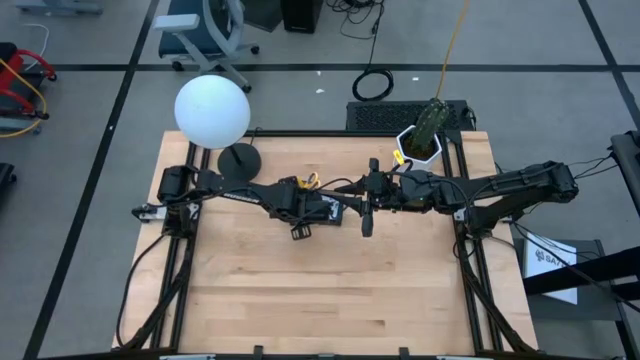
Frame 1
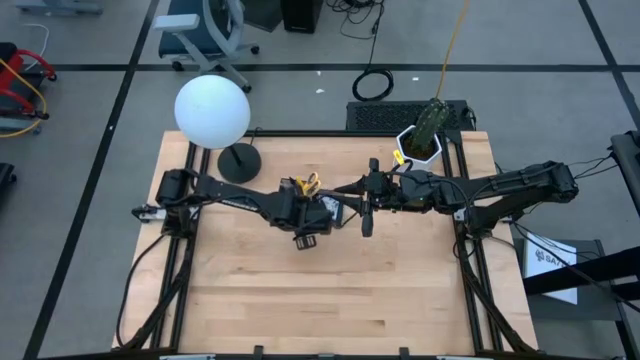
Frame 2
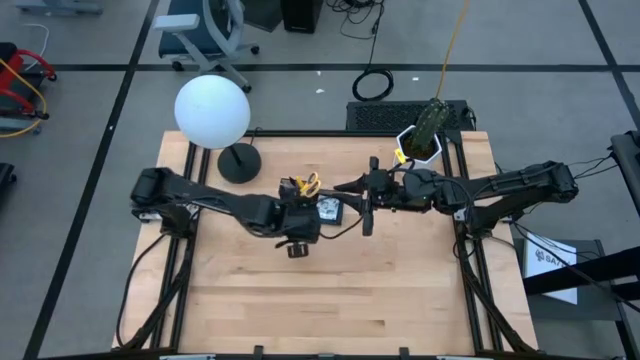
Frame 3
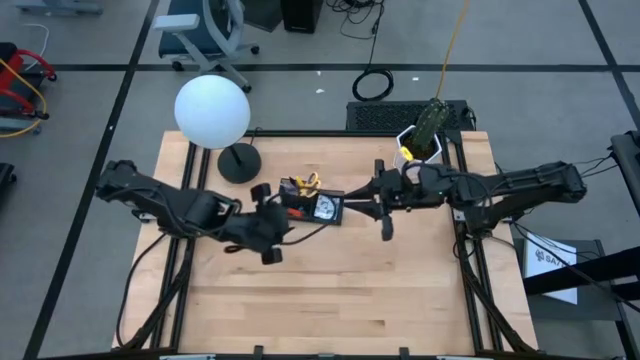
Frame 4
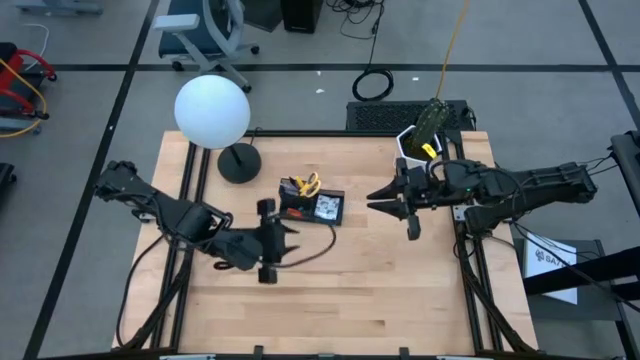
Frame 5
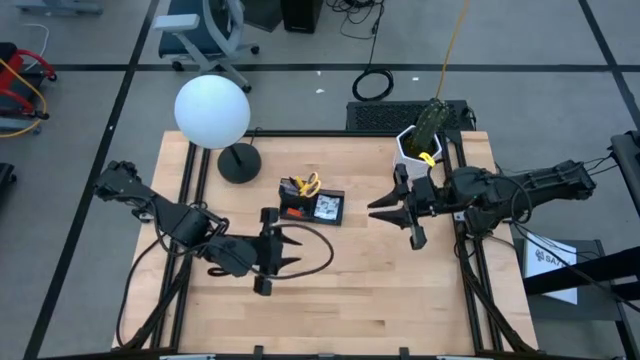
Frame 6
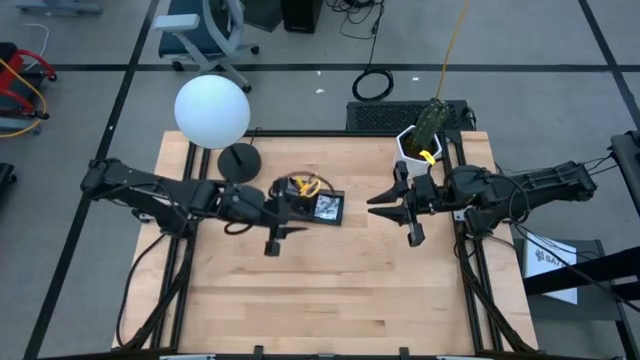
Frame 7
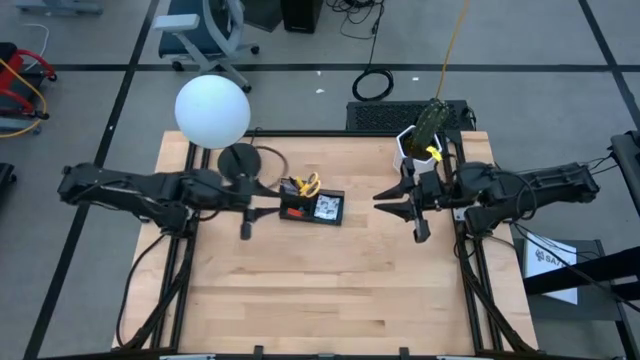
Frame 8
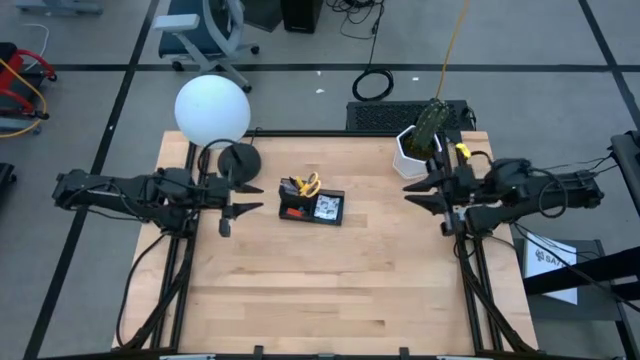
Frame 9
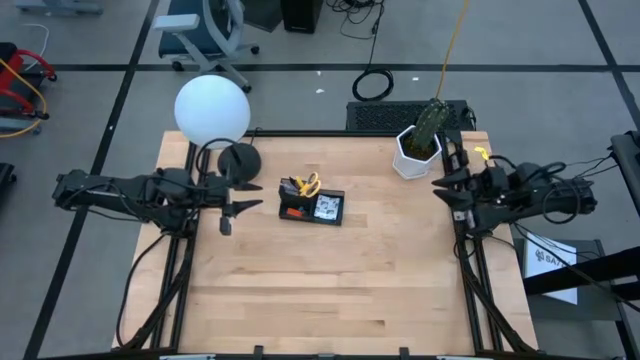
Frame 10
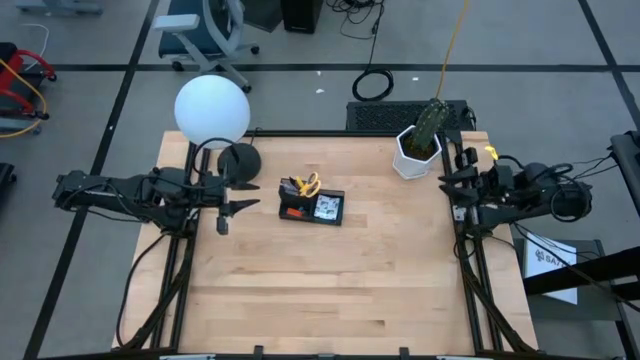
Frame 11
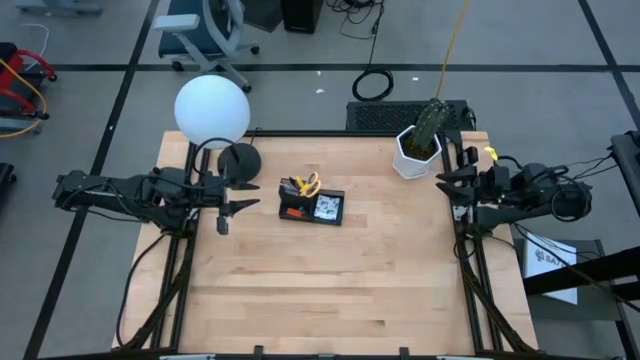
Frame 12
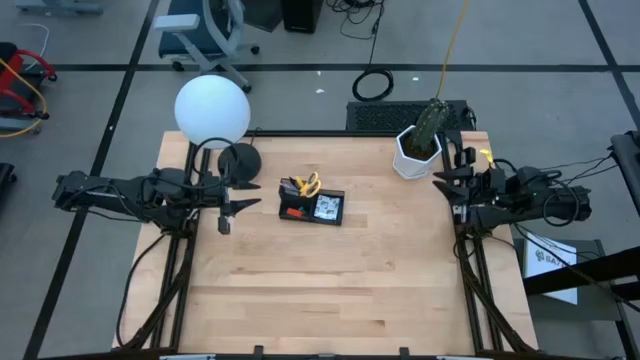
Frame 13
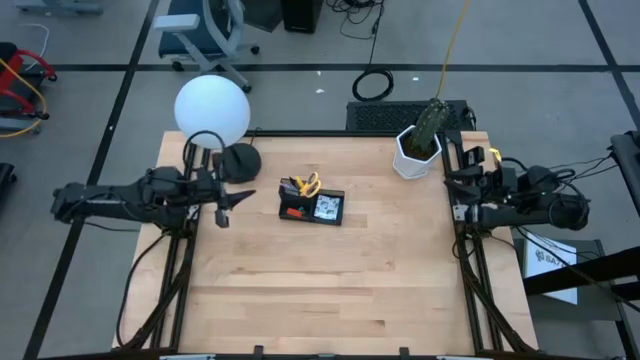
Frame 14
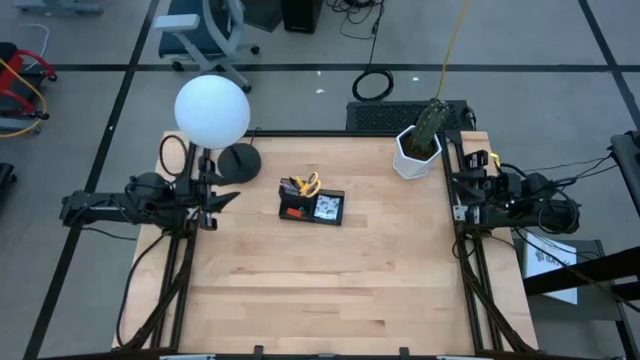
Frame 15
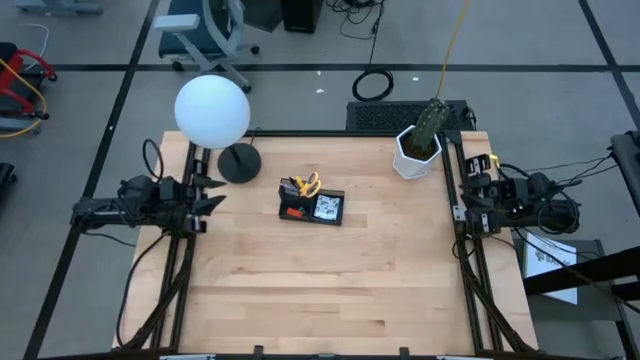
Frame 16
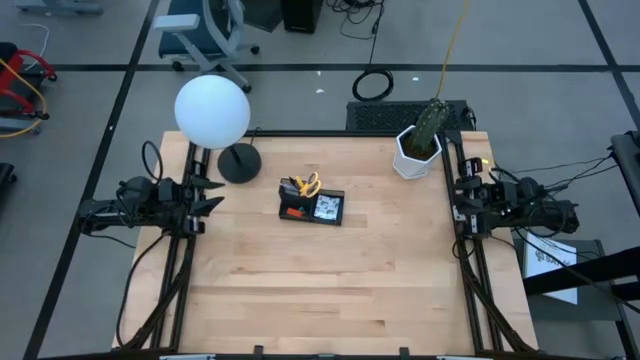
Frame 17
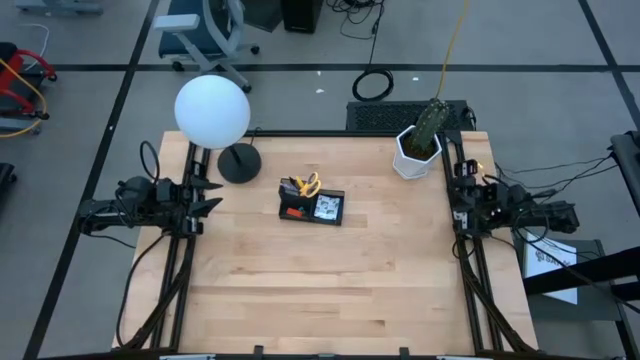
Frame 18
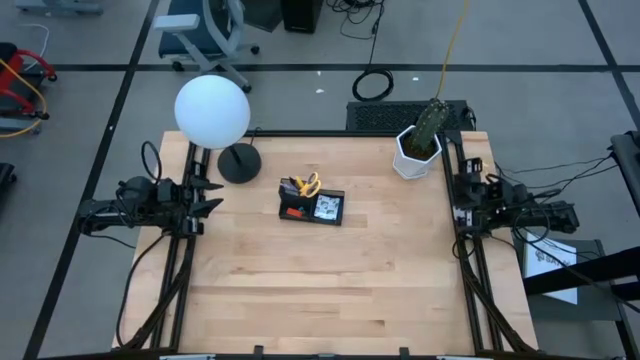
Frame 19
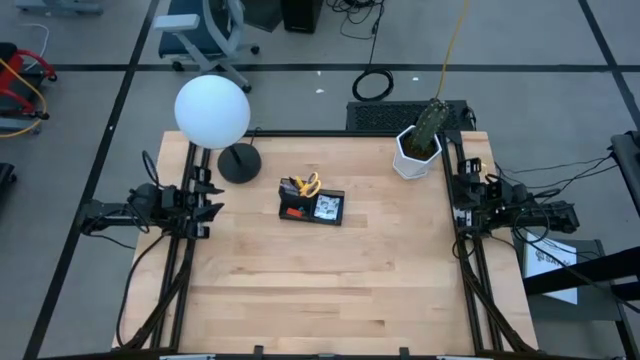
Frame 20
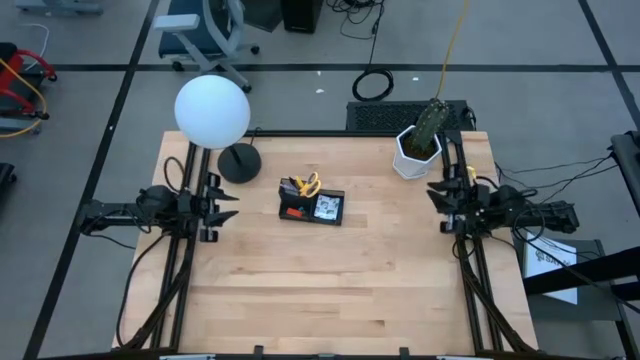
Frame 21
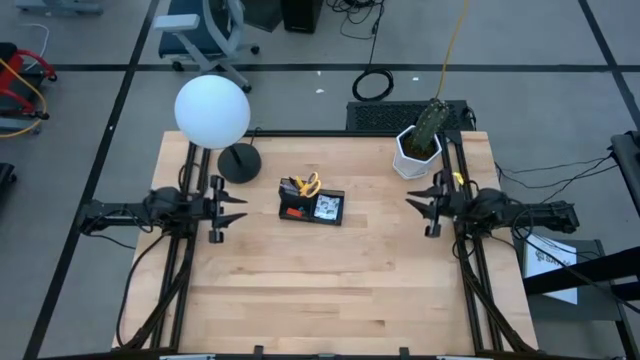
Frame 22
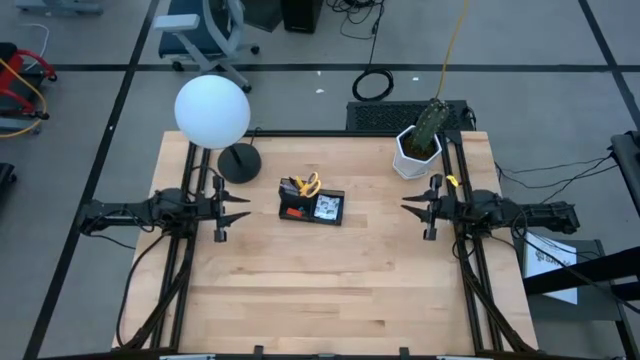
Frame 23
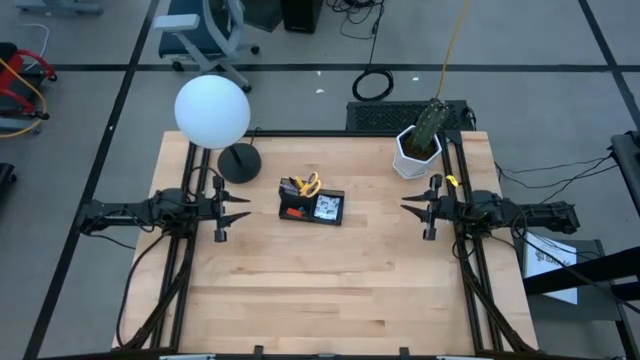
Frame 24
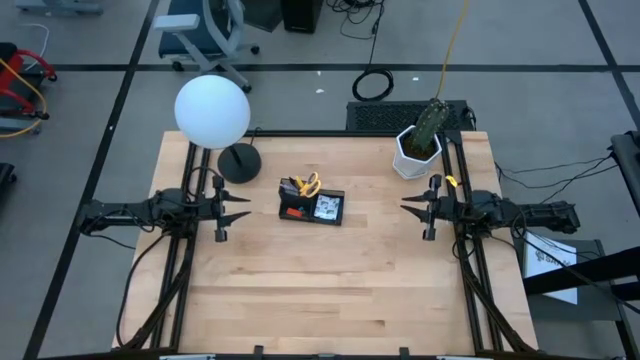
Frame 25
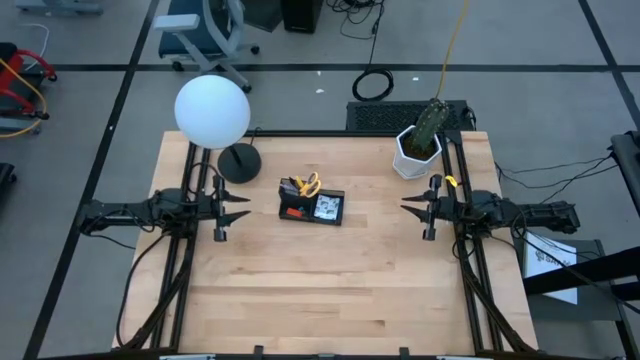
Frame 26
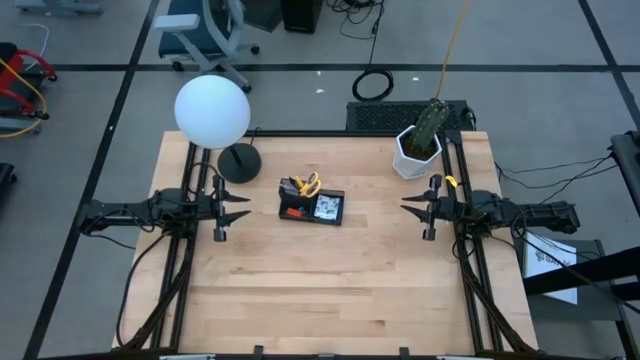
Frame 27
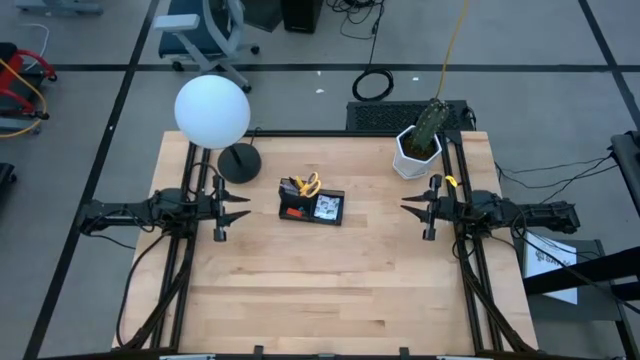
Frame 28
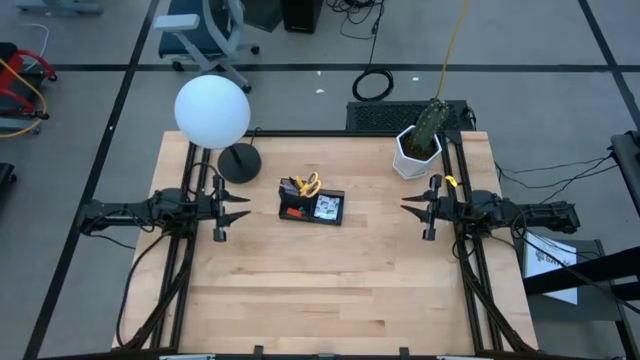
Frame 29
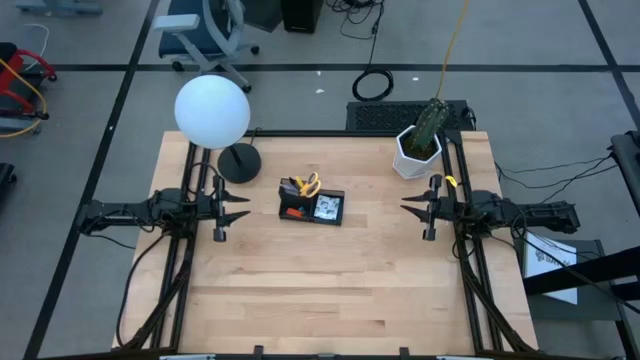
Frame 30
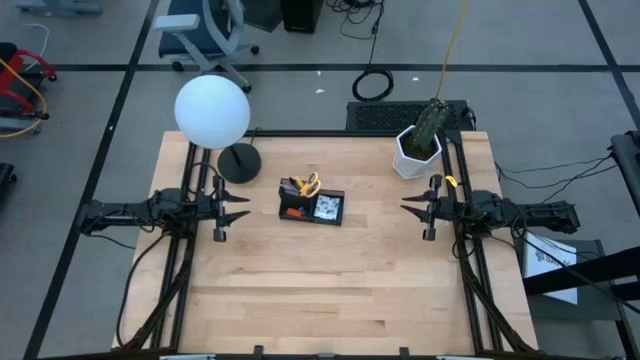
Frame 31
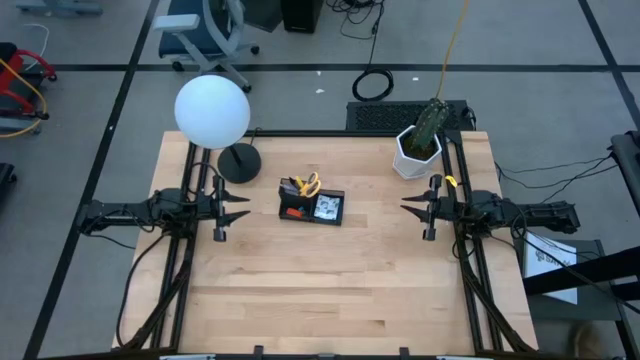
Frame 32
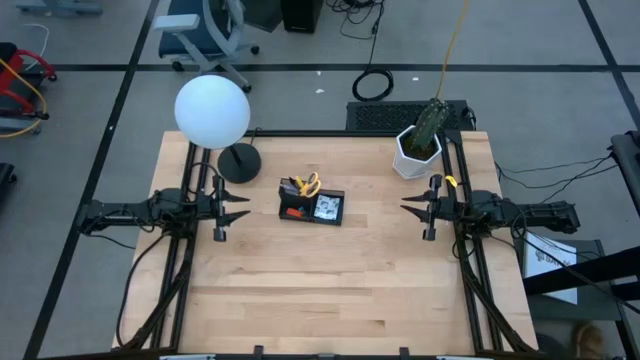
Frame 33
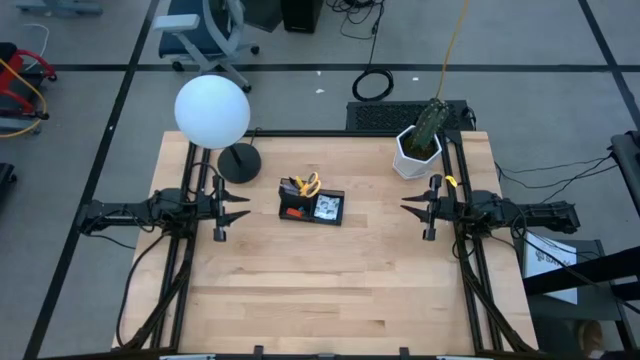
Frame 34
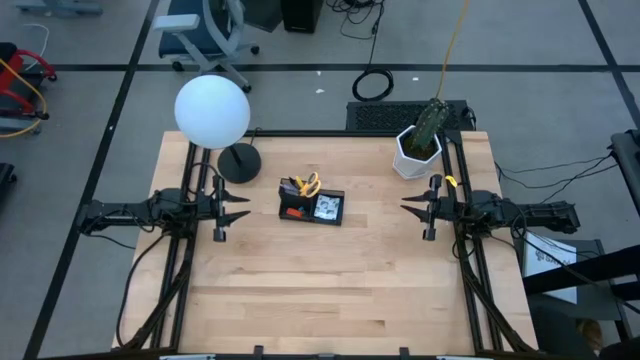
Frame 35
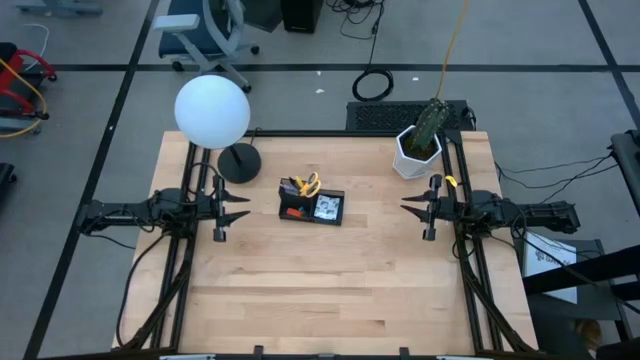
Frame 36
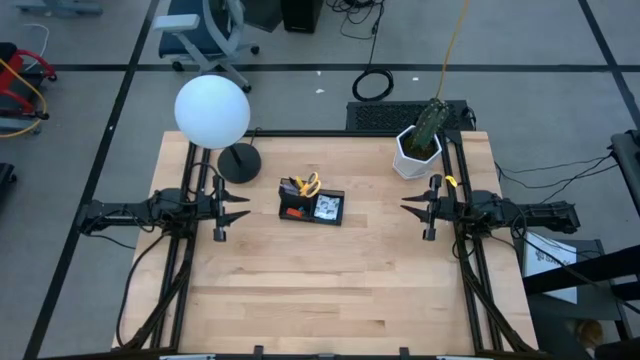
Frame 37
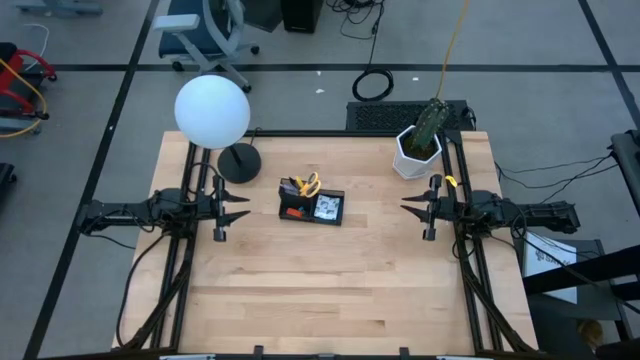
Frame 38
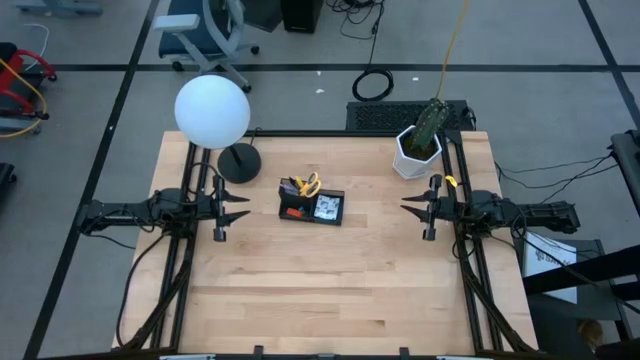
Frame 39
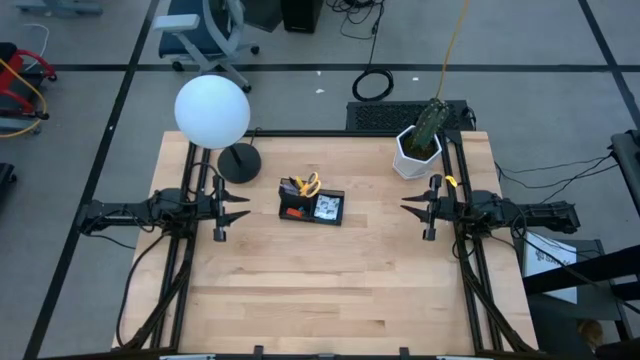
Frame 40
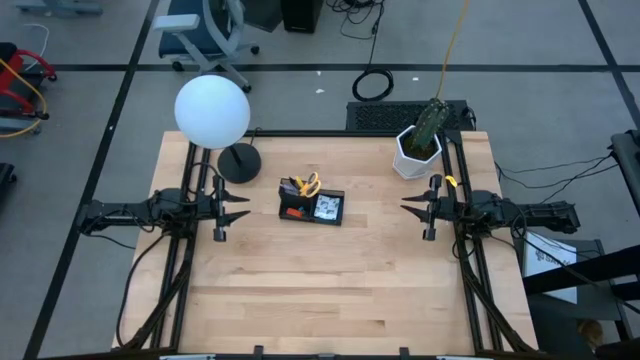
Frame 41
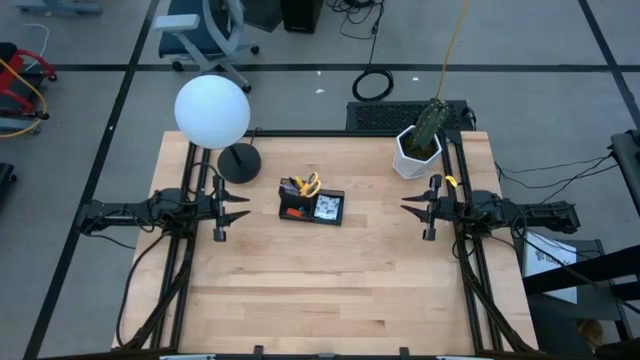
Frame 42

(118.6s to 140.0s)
Task: Pick and place office supplies into organizer
Return to home position
